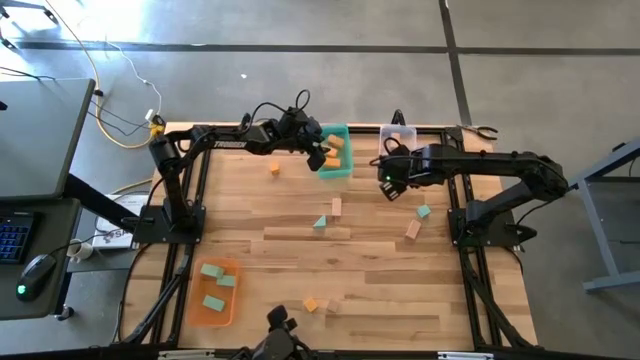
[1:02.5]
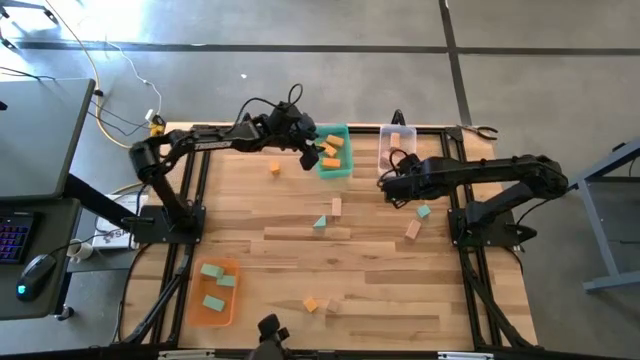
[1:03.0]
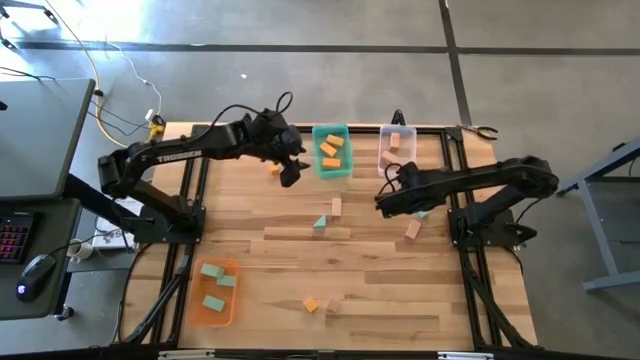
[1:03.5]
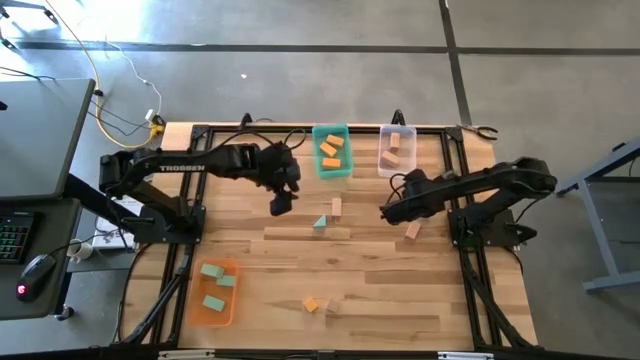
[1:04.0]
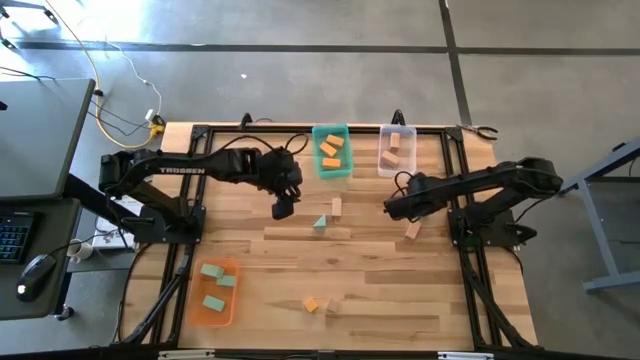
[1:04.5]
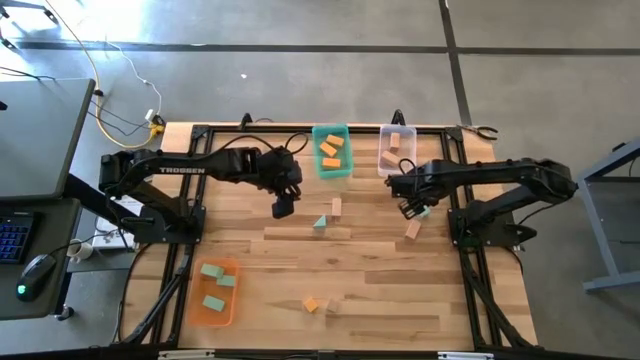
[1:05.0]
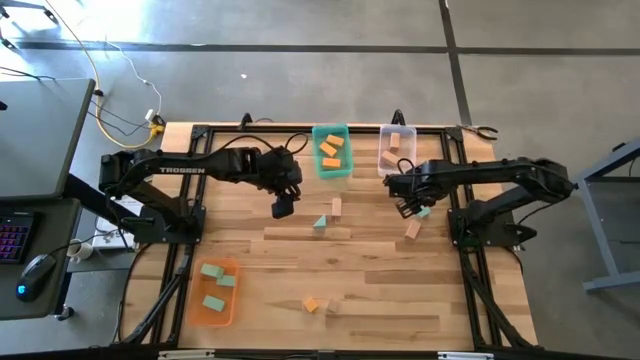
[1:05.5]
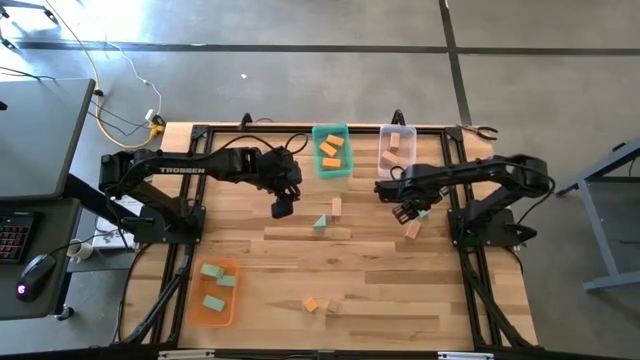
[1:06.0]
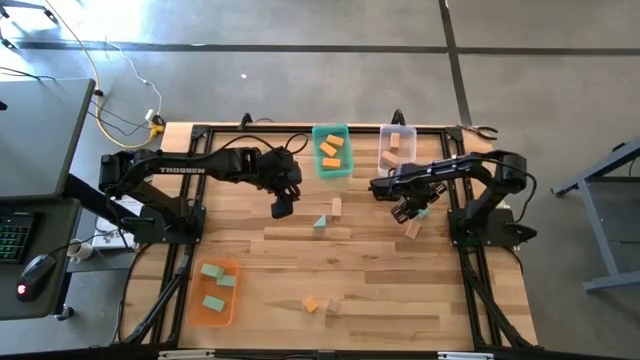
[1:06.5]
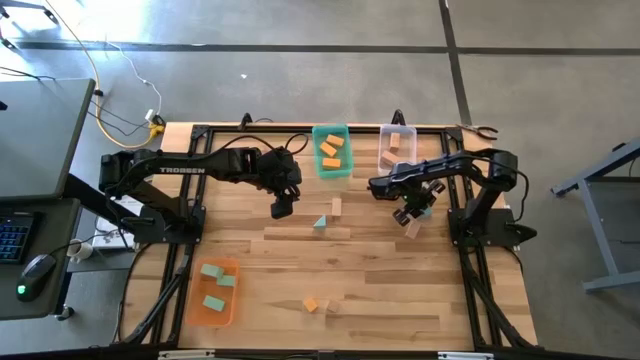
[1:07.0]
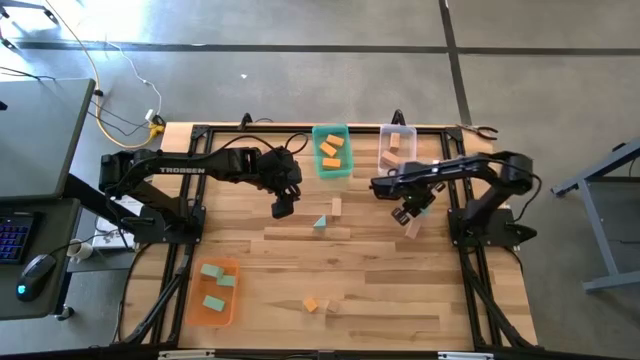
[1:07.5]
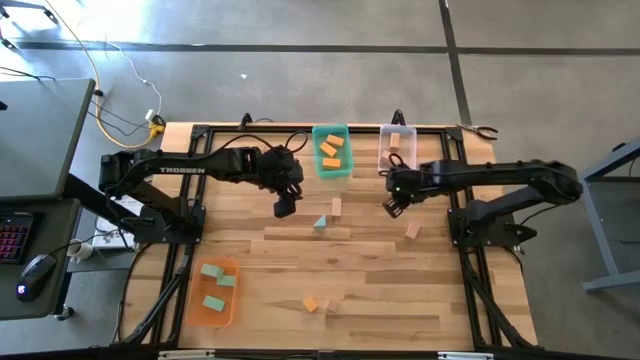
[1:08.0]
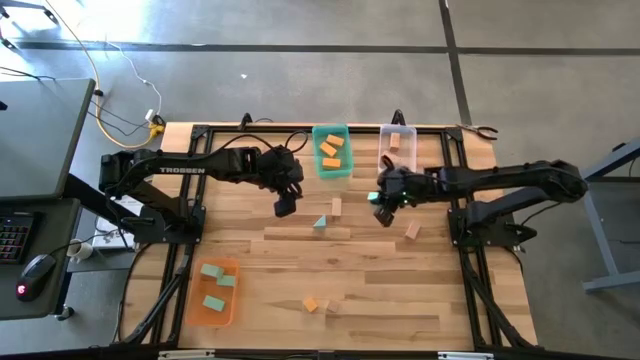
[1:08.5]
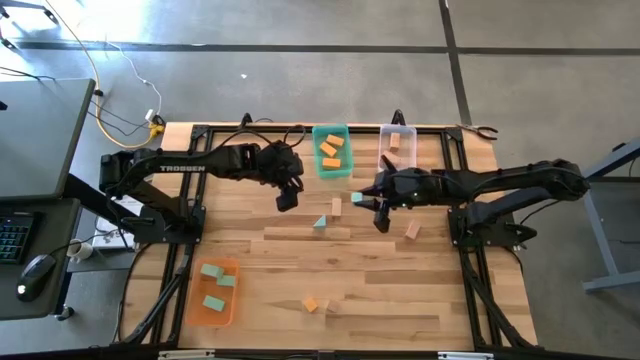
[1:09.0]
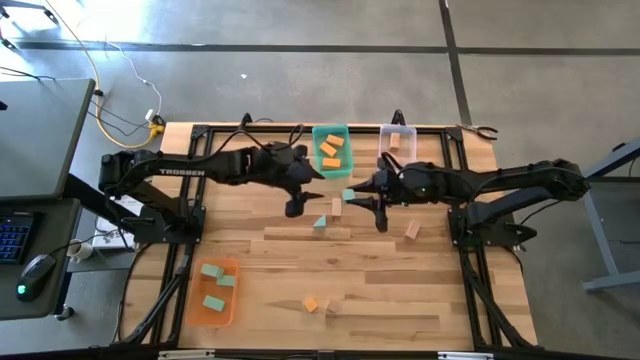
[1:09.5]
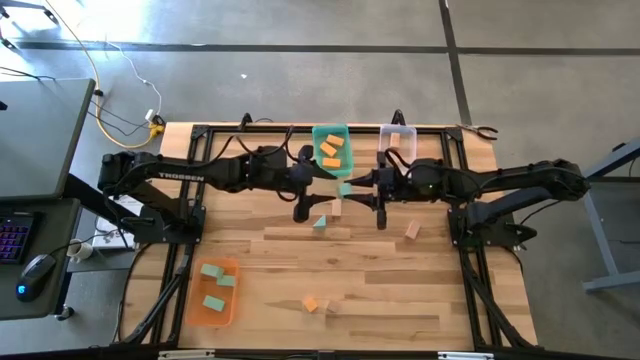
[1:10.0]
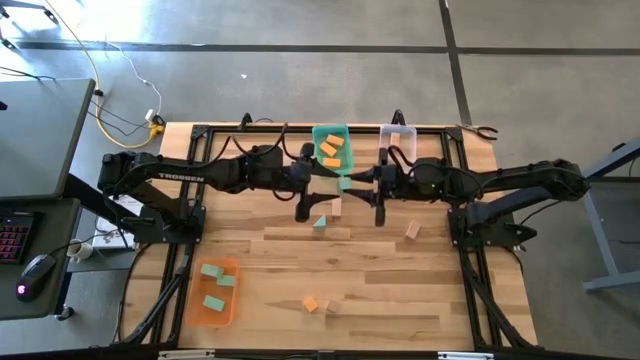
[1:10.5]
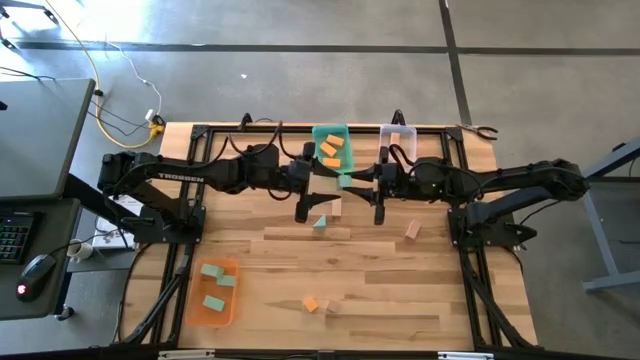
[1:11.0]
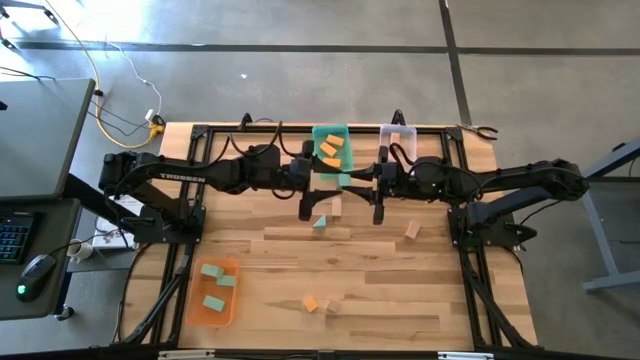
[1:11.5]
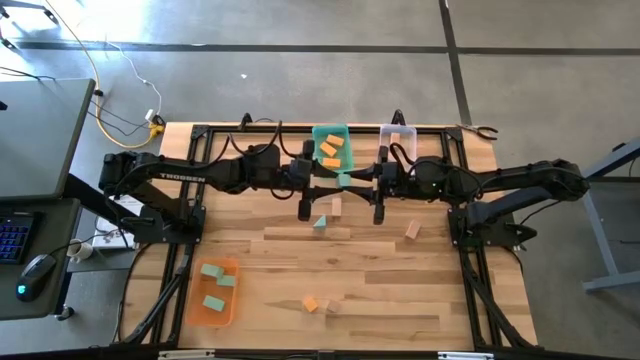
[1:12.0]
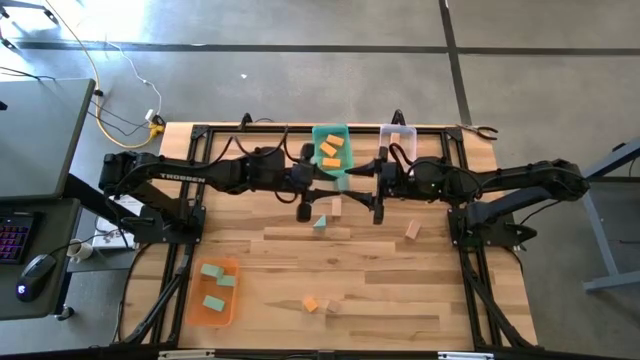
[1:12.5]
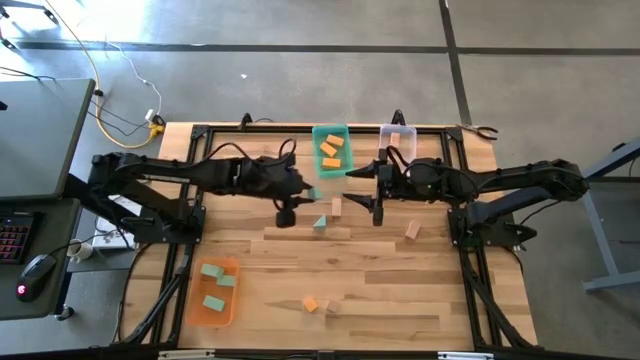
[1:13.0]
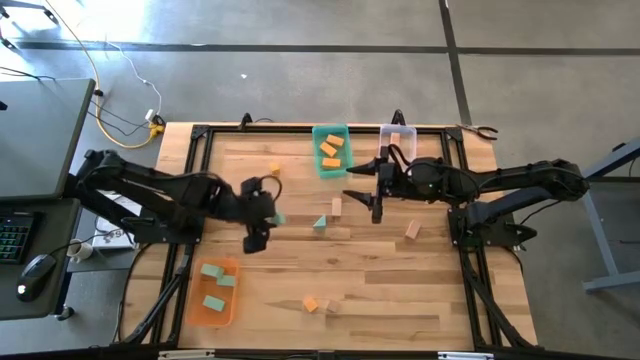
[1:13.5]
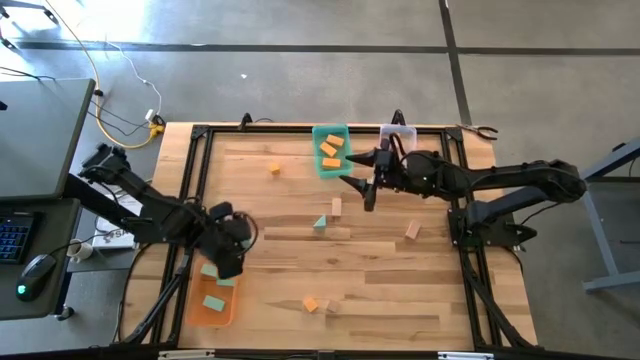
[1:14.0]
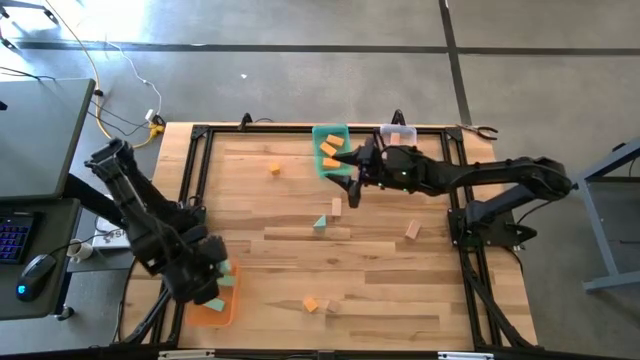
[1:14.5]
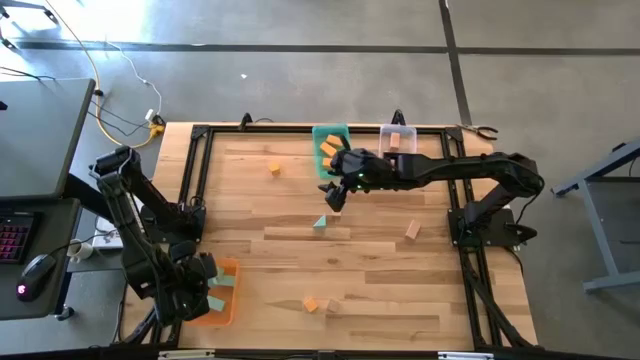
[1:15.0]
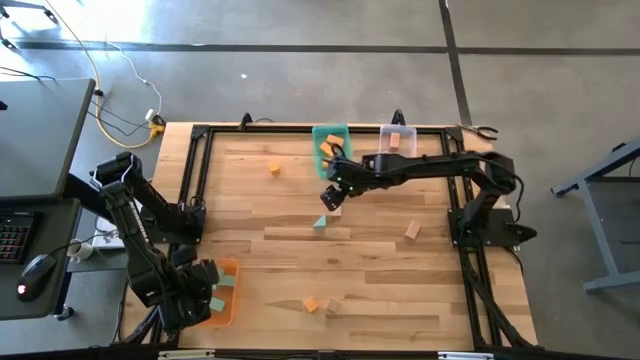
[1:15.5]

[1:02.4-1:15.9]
Task: Sort & place blocks by color
Put the light blue block into the orange orange bin

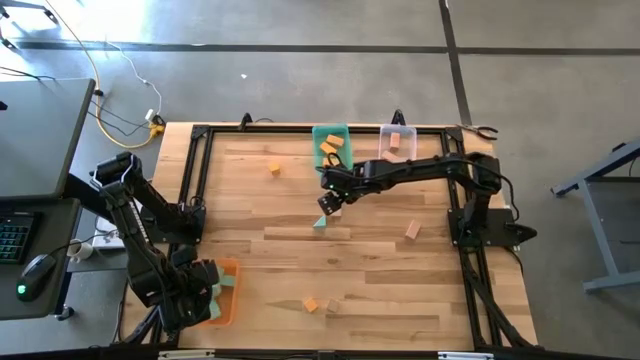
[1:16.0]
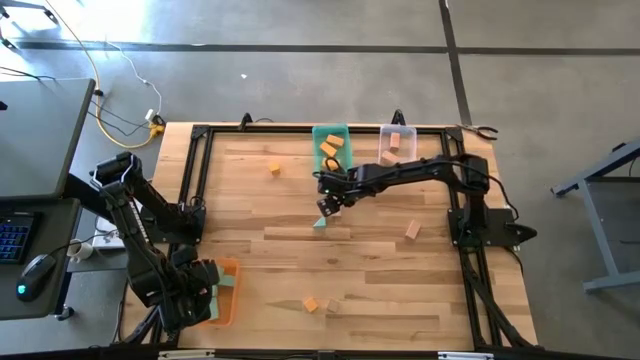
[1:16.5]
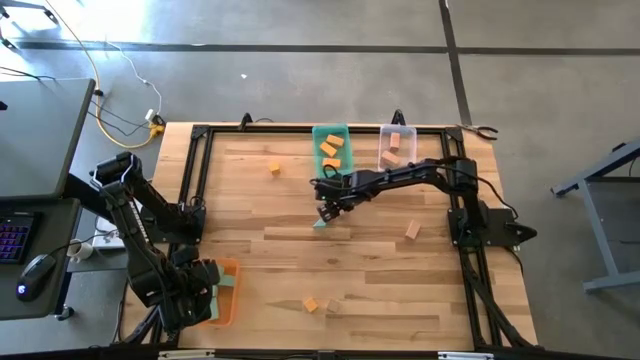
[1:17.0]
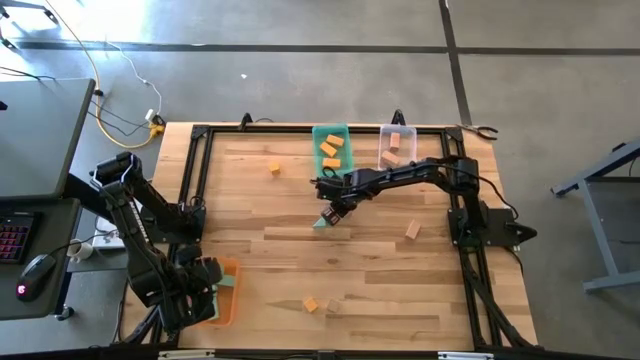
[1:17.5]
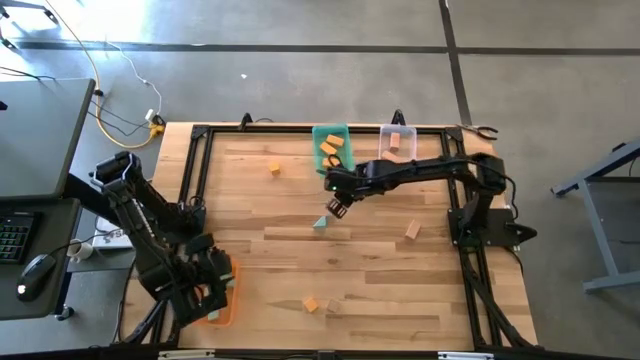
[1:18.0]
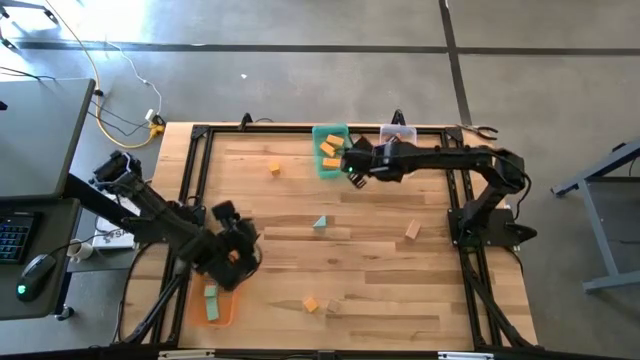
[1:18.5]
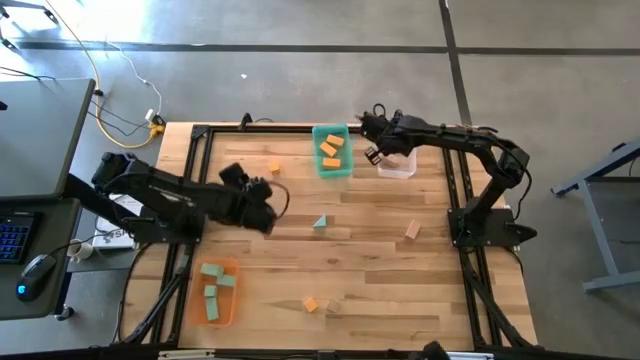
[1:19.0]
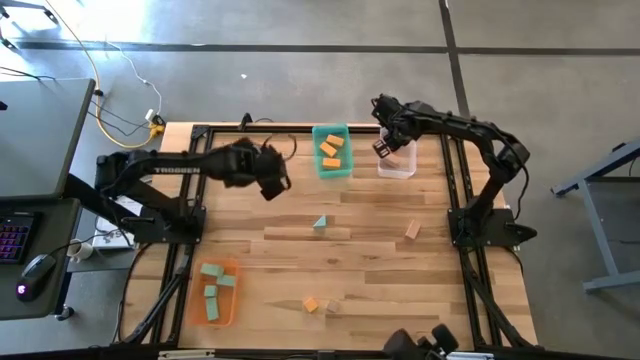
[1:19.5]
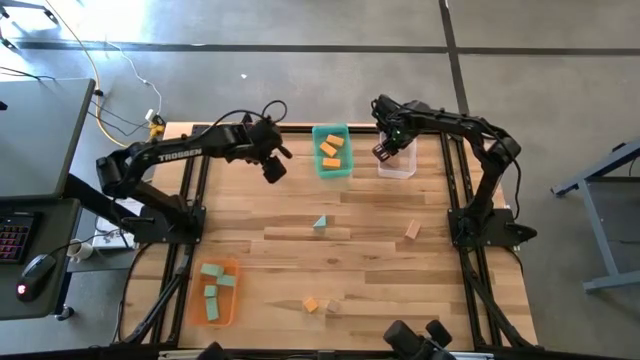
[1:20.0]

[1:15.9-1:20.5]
Put the brown block into the transparent bin

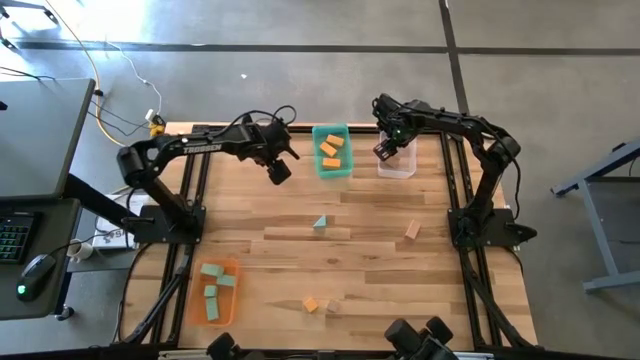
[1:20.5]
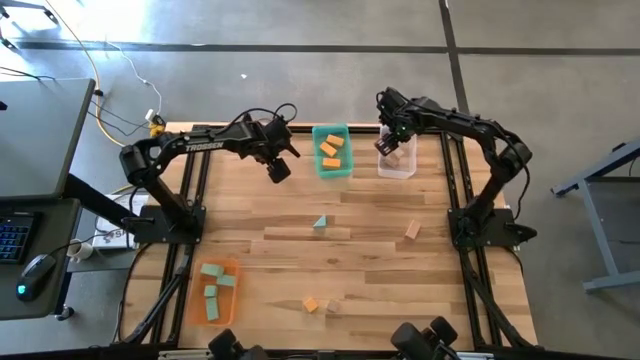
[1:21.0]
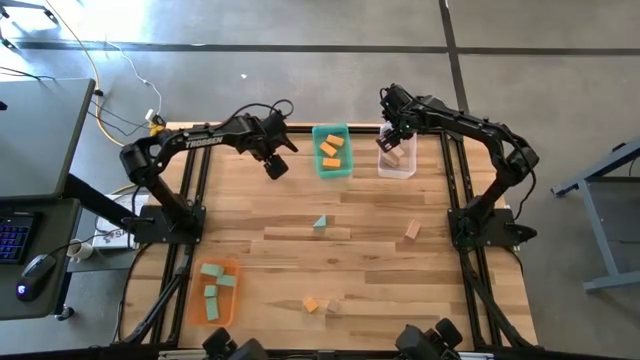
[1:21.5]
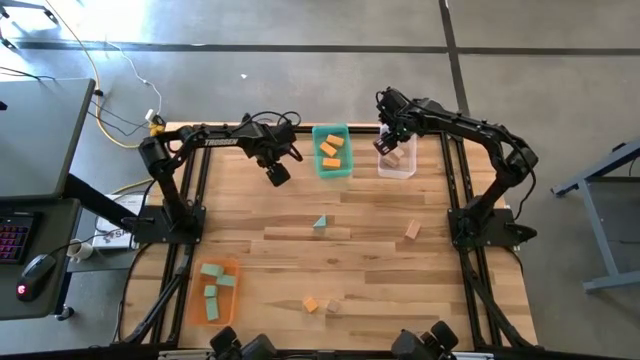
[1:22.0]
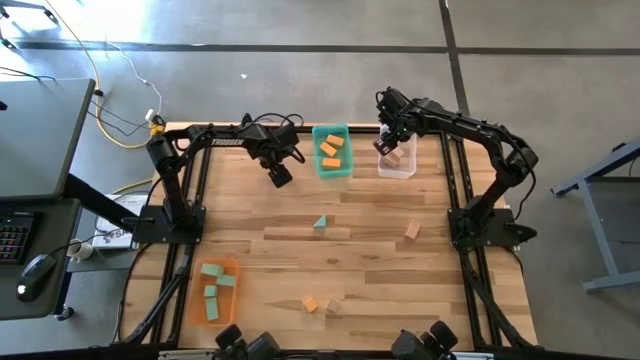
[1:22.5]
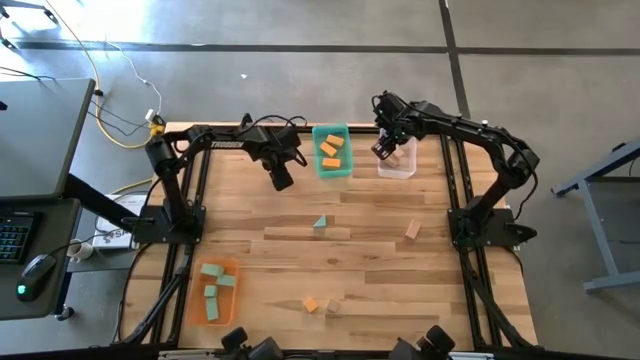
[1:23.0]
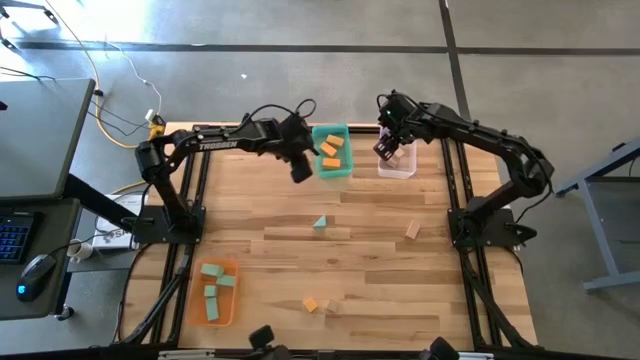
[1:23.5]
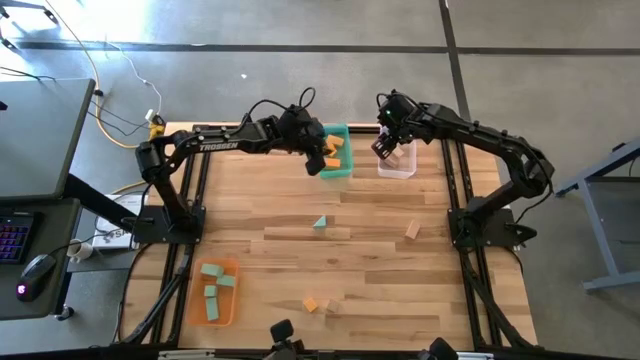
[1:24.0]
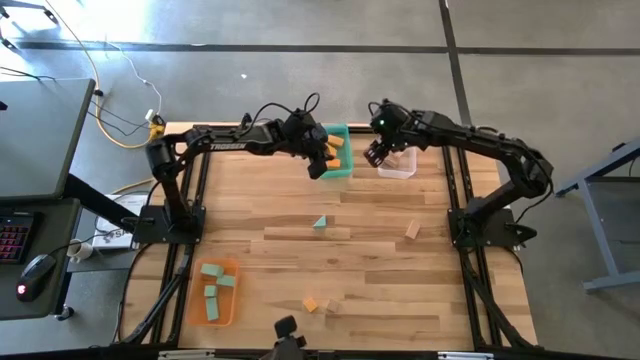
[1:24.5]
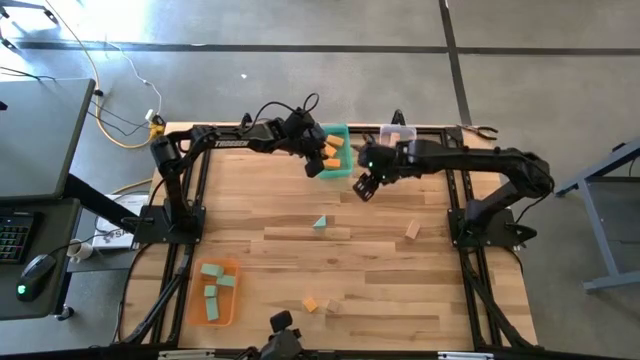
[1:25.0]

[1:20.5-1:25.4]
Put the yellow block into the blue bin
